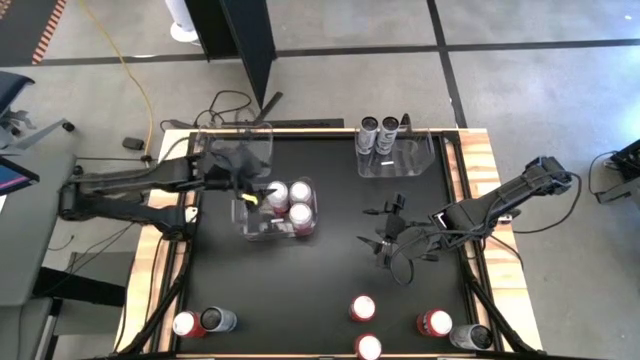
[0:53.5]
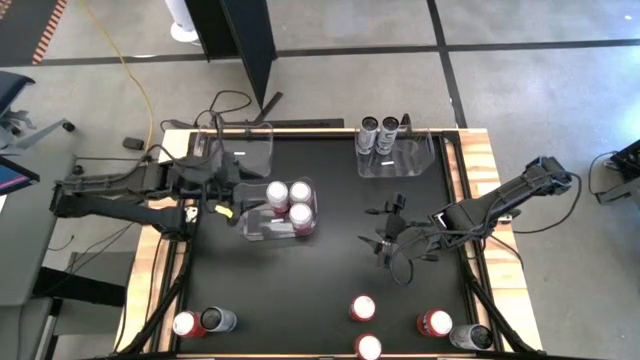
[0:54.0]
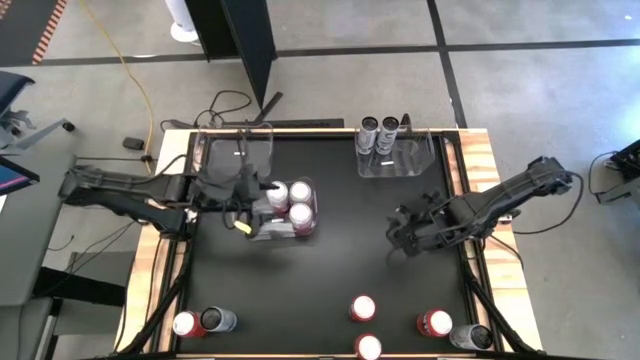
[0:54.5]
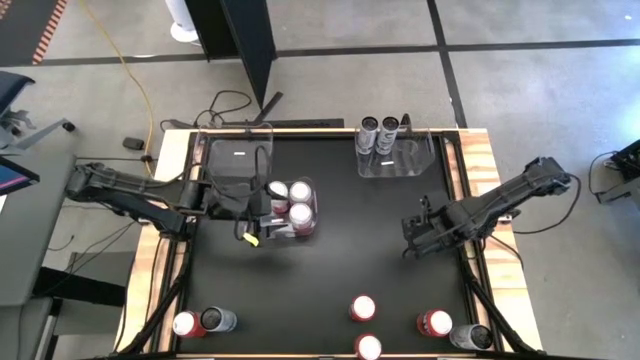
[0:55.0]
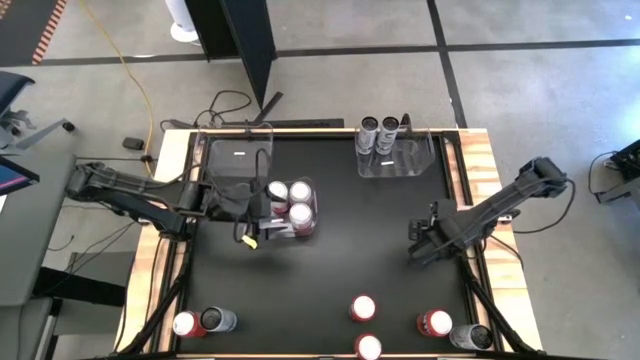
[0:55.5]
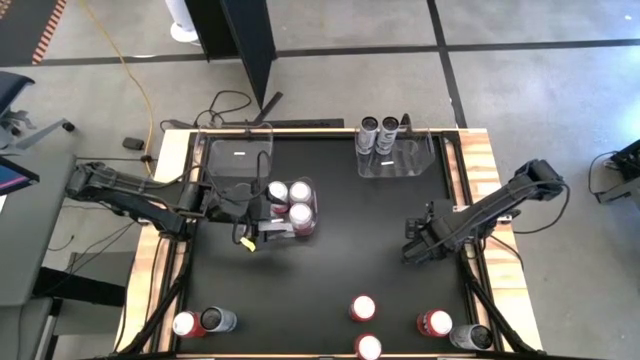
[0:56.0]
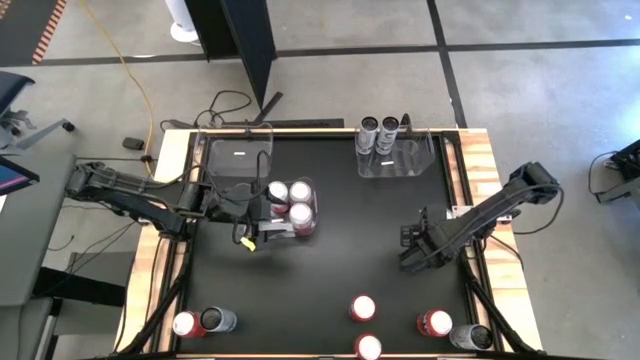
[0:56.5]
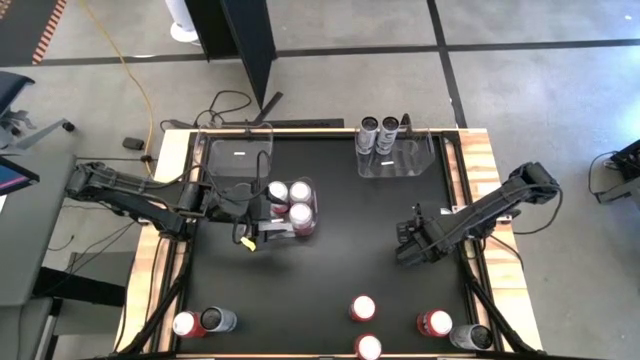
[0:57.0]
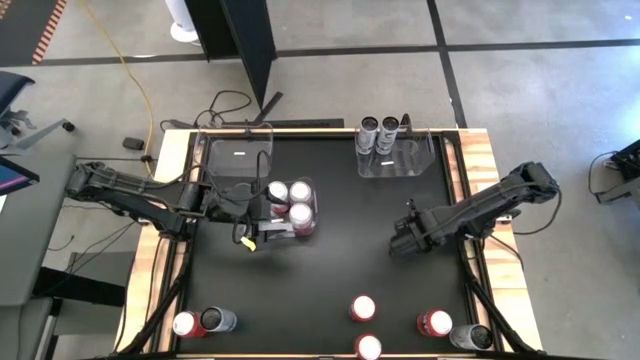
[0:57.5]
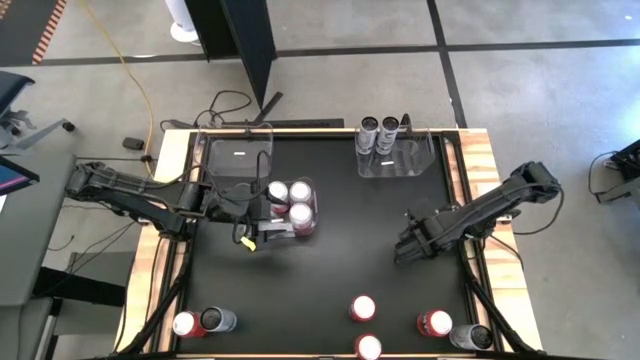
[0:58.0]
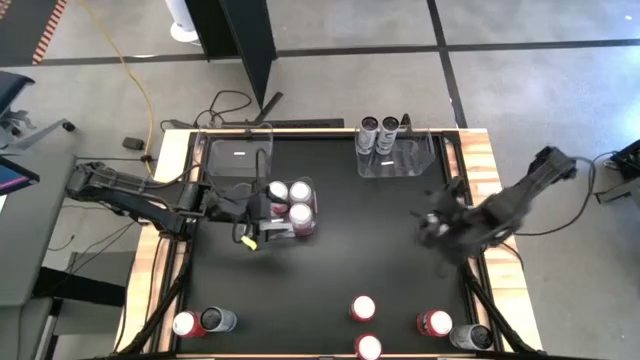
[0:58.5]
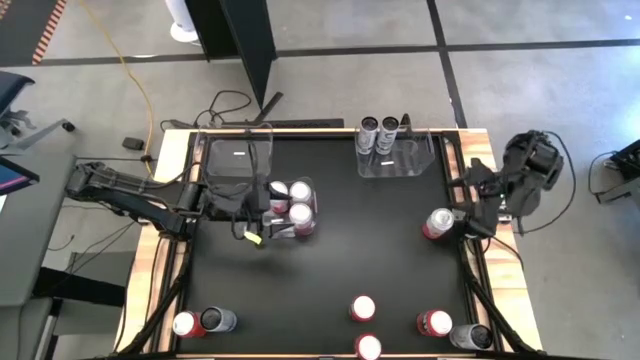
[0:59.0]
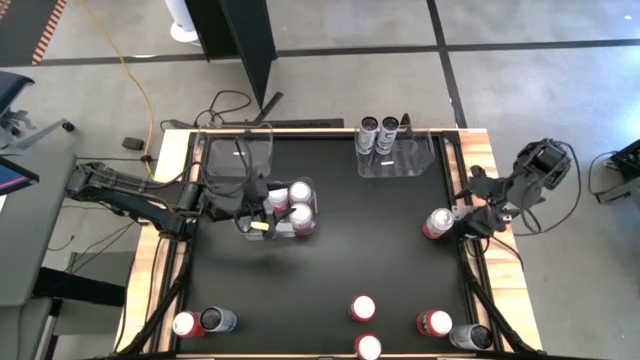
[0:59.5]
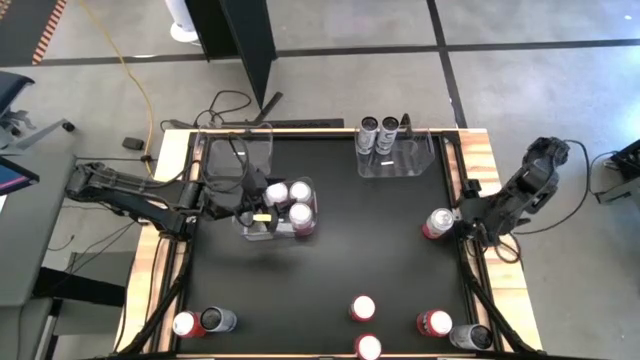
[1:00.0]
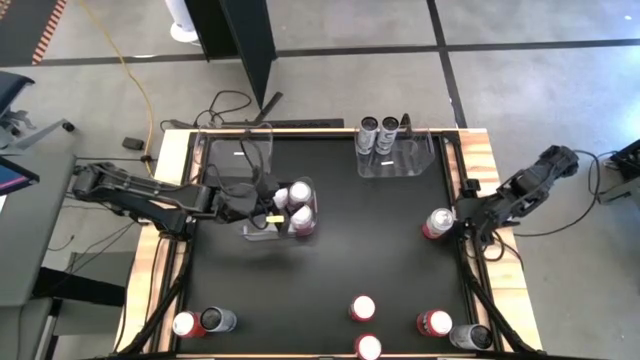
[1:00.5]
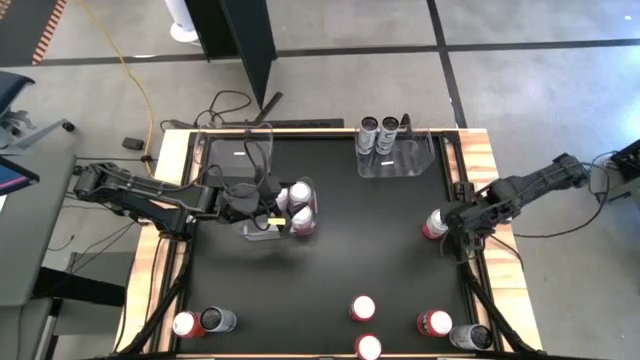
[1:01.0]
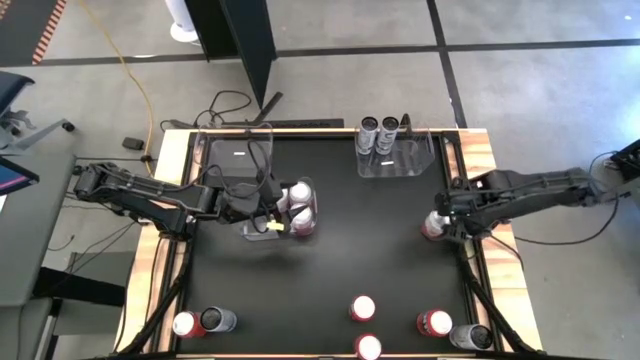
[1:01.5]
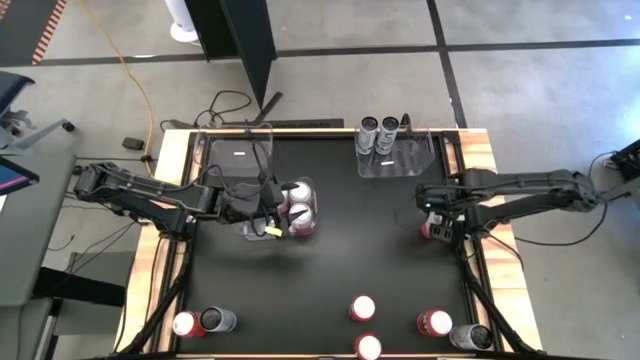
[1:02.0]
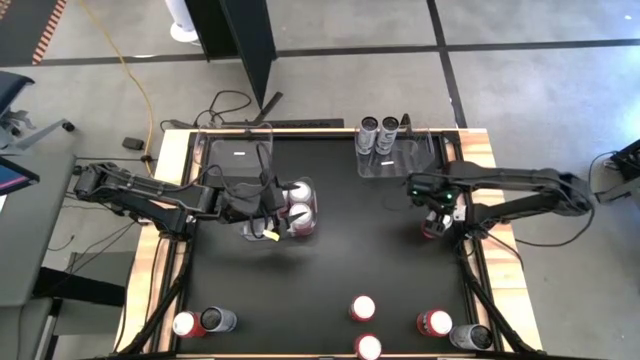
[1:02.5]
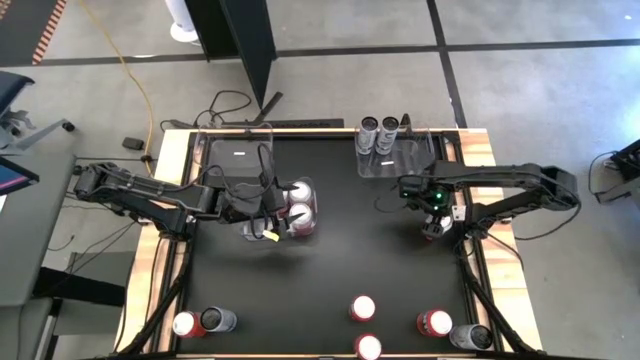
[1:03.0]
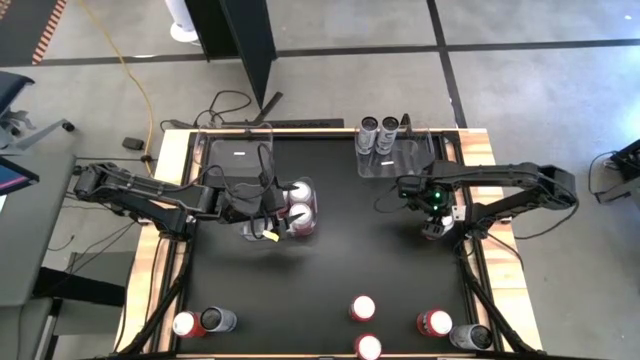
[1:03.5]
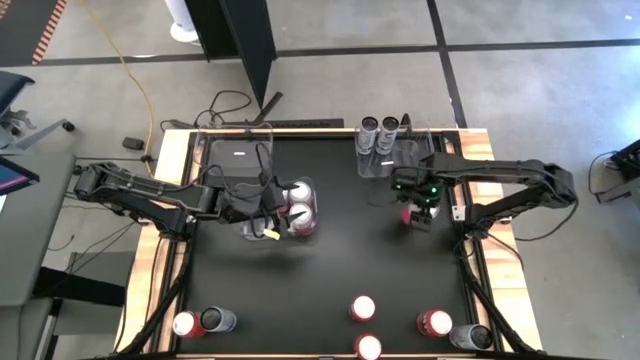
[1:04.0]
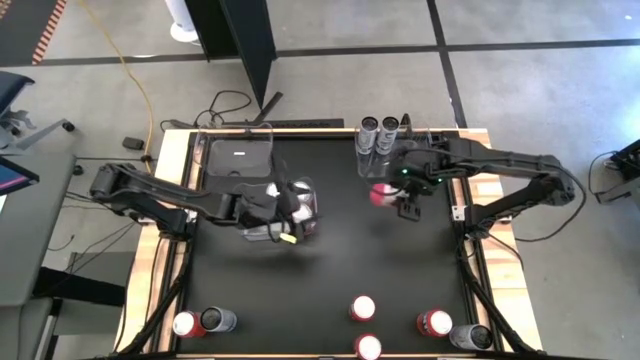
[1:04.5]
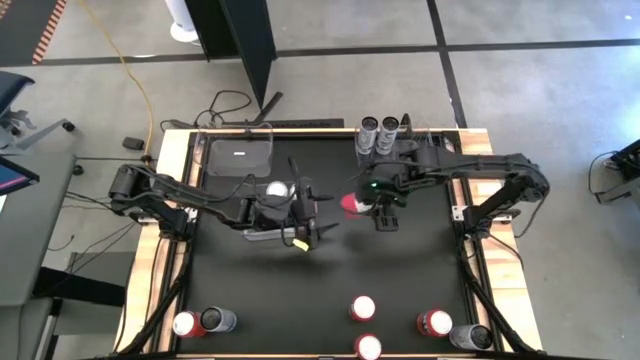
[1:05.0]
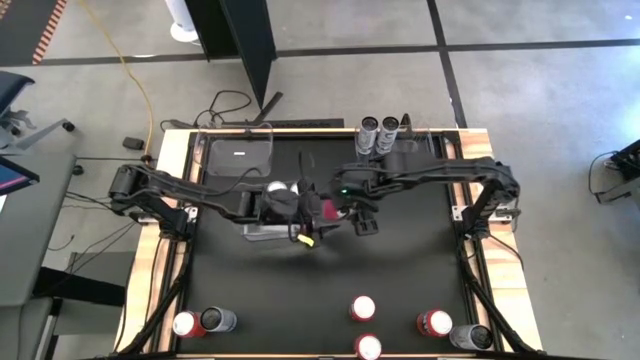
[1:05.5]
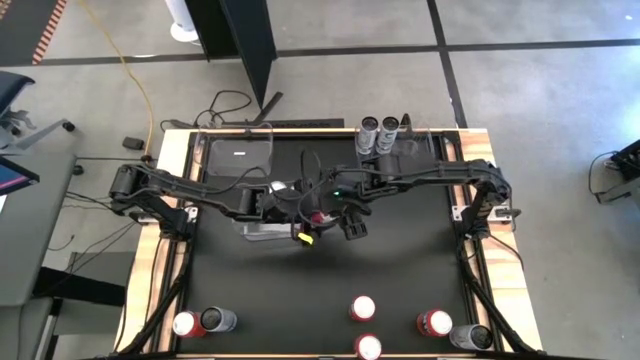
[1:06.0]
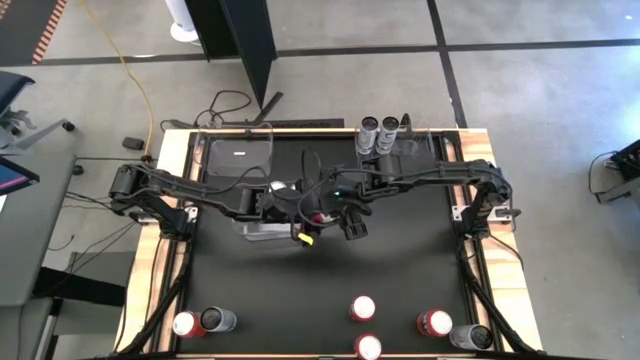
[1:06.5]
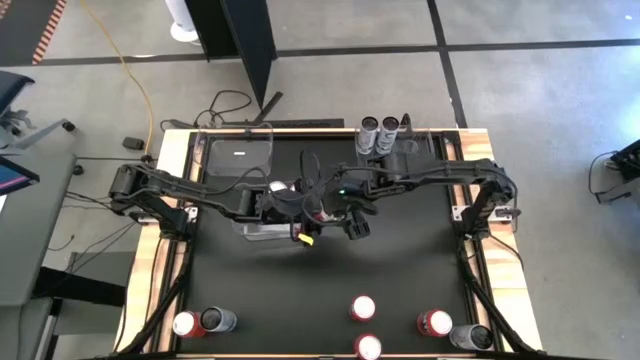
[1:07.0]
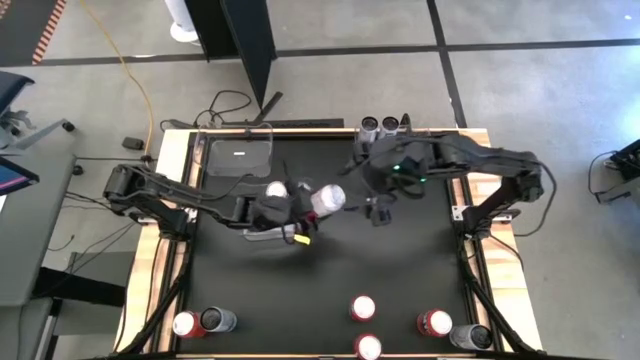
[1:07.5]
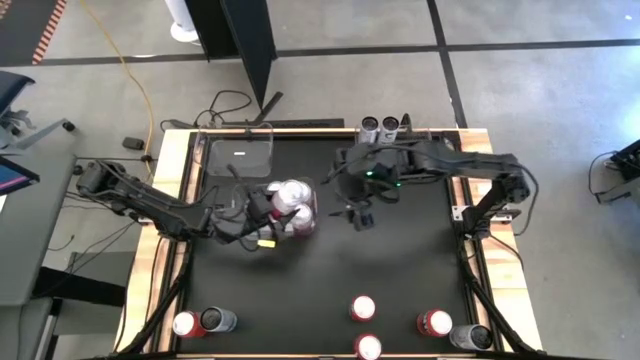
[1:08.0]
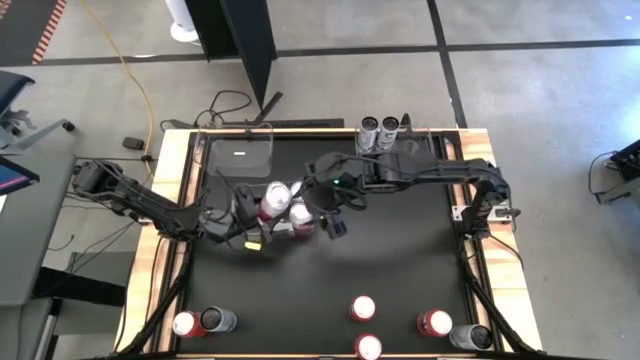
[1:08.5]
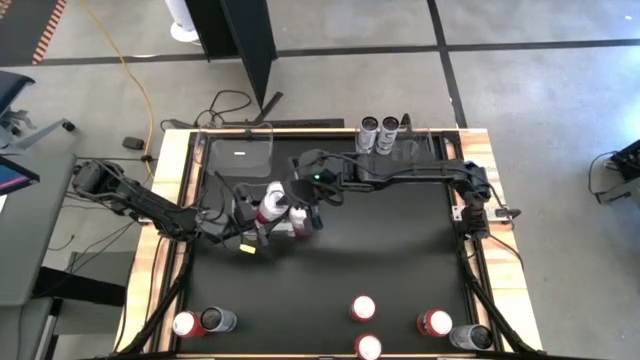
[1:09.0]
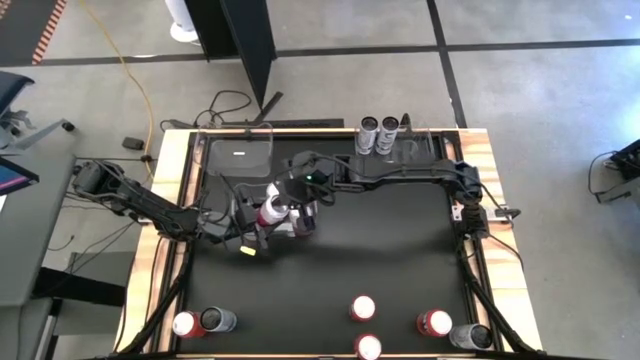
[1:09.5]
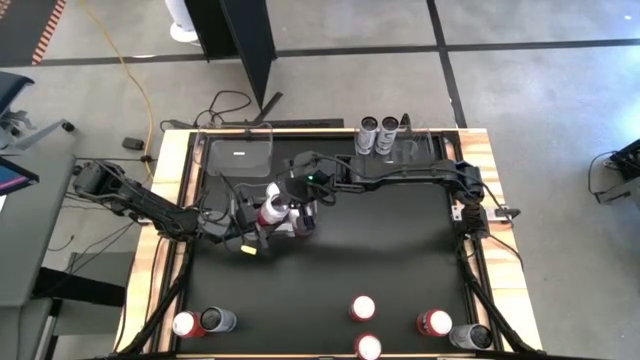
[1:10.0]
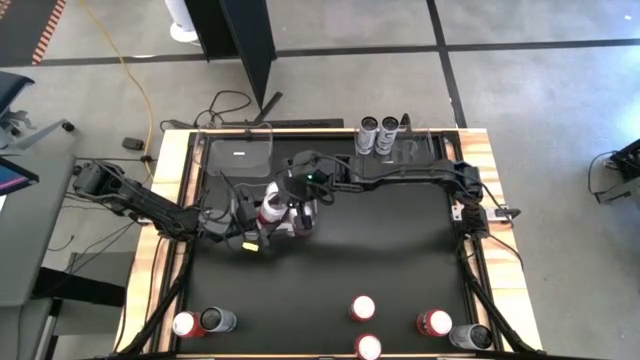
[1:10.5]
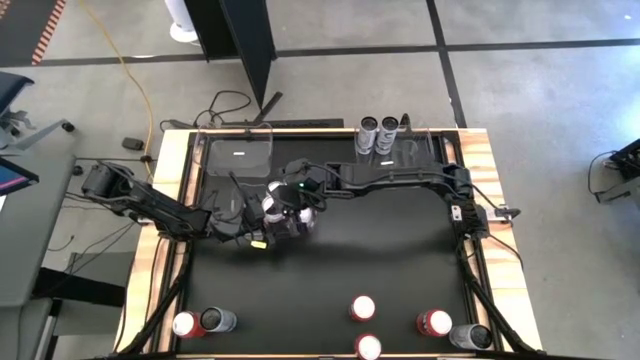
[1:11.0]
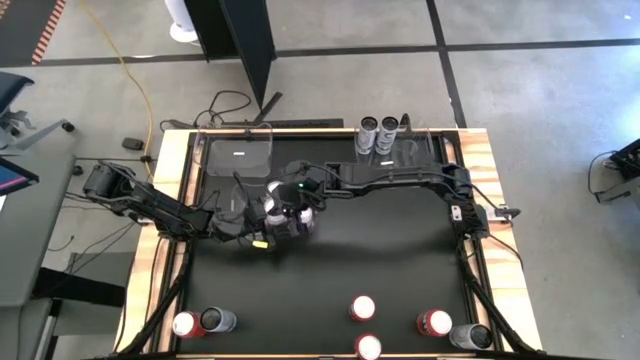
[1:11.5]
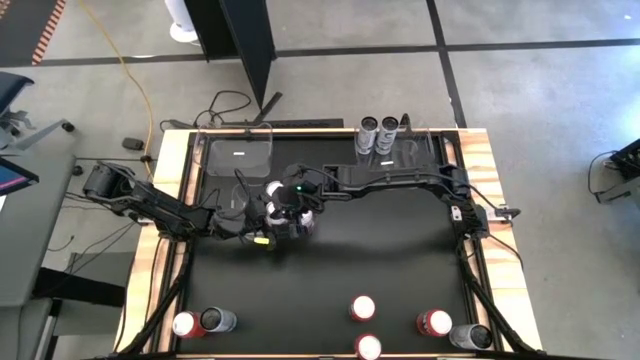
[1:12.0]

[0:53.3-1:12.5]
Task: Sort soda cans
Put the pink-white soda can into the bottom transparent bin

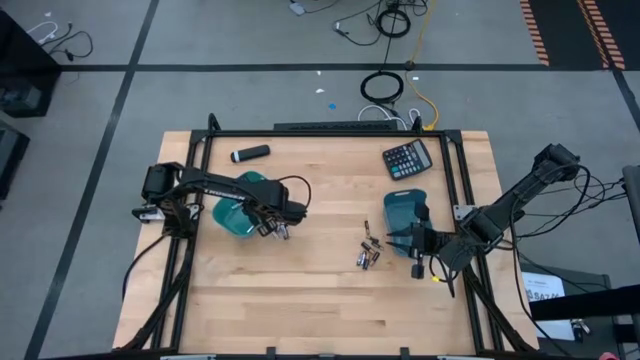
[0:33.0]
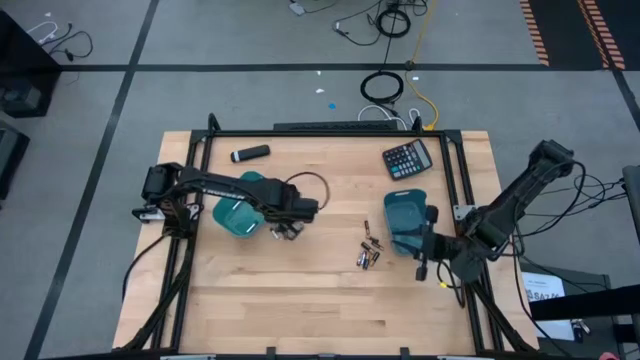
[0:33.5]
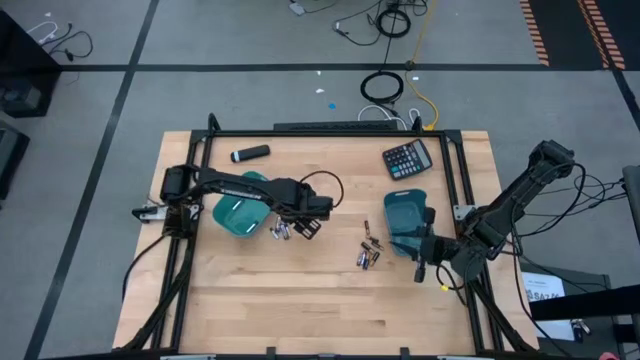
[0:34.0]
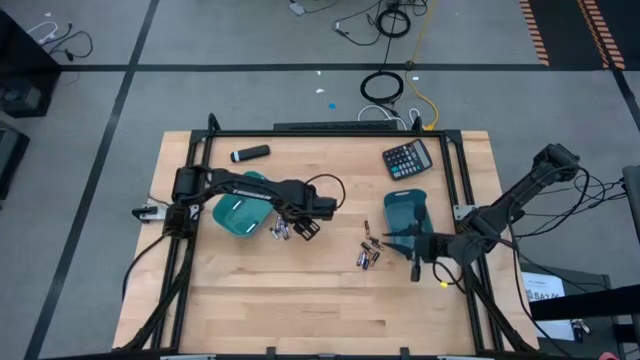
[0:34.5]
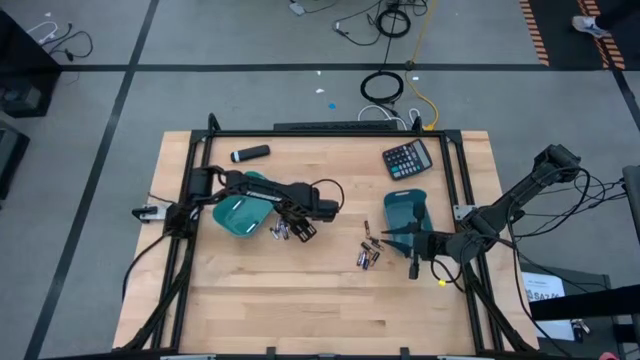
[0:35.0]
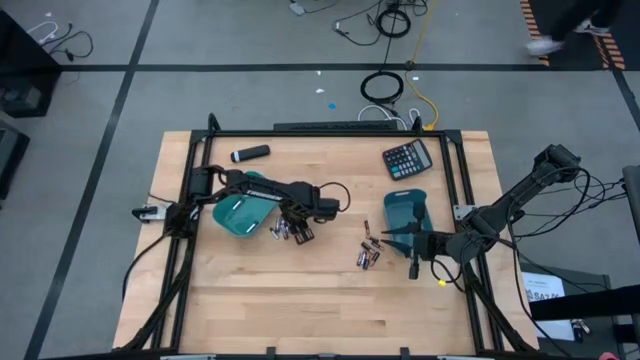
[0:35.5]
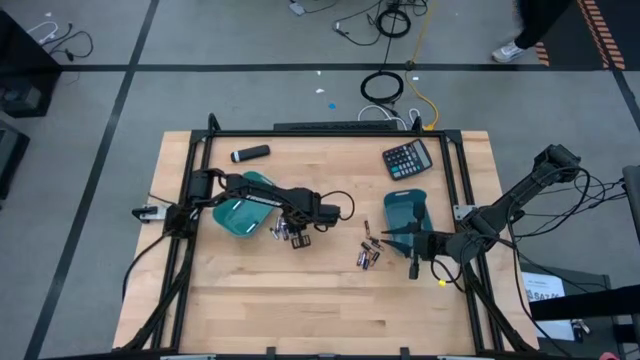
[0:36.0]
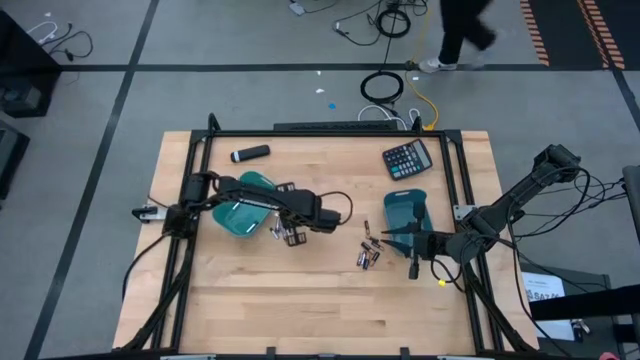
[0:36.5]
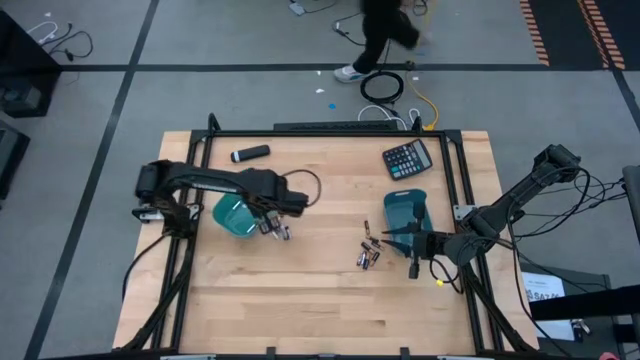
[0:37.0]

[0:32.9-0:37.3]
Task: Sort batteries
Put the silver battery into the green bin
